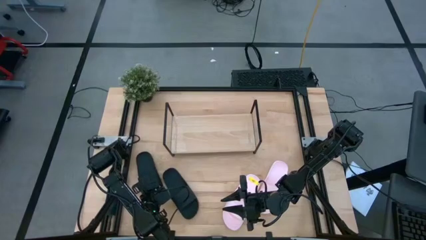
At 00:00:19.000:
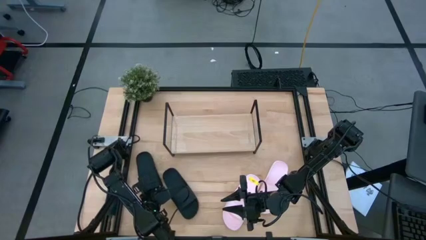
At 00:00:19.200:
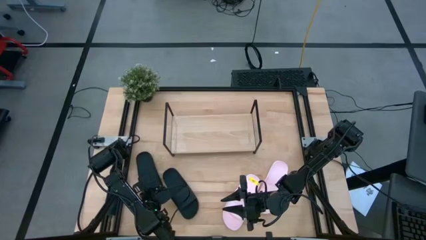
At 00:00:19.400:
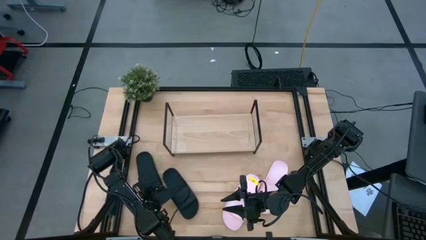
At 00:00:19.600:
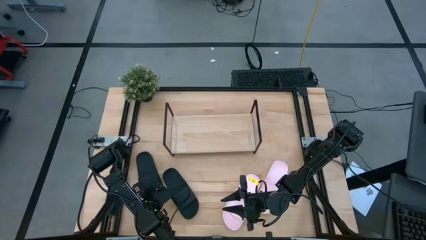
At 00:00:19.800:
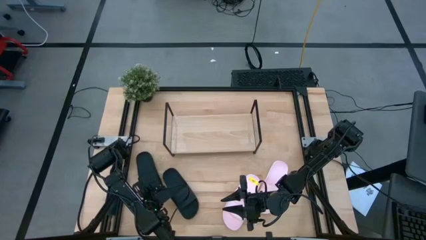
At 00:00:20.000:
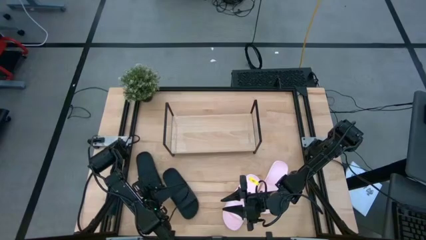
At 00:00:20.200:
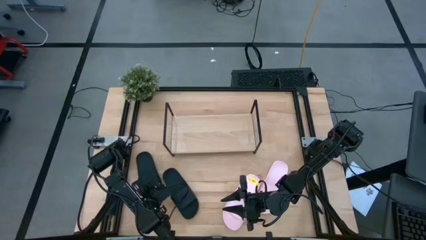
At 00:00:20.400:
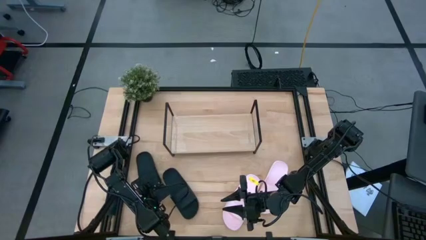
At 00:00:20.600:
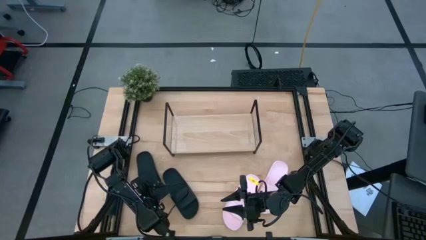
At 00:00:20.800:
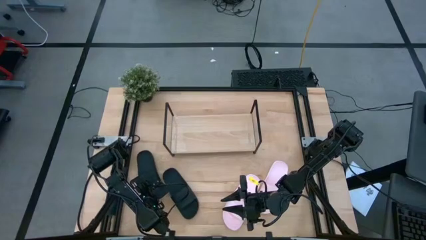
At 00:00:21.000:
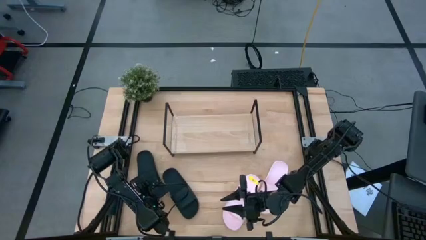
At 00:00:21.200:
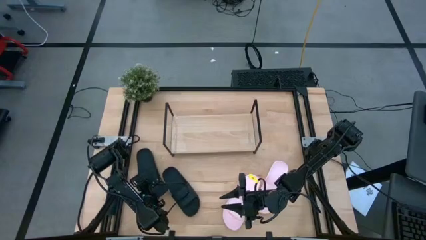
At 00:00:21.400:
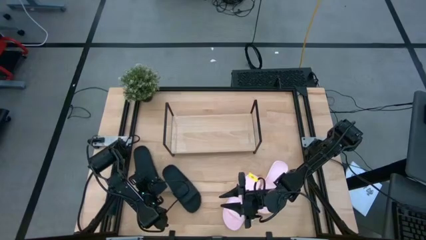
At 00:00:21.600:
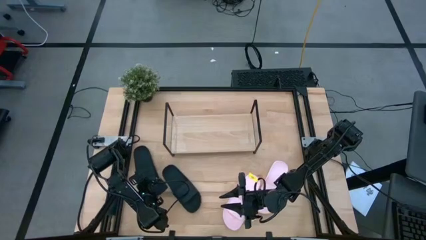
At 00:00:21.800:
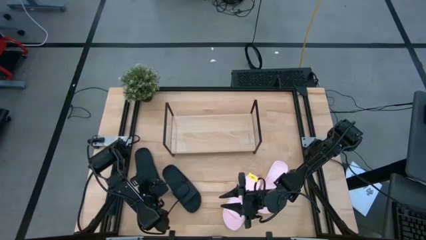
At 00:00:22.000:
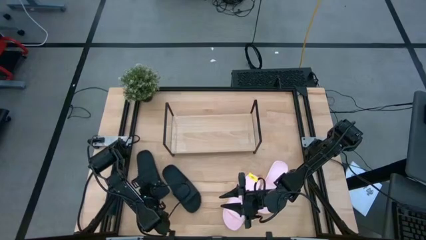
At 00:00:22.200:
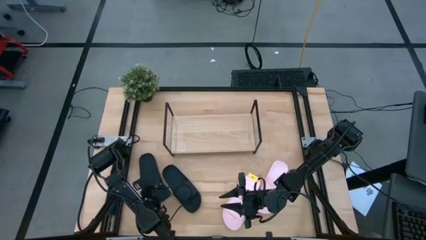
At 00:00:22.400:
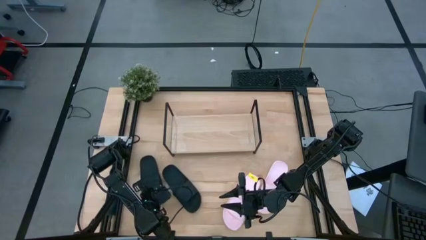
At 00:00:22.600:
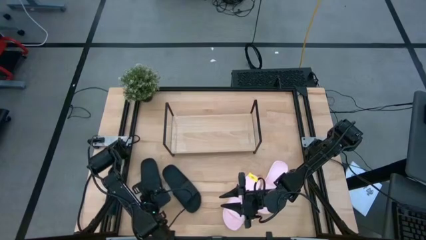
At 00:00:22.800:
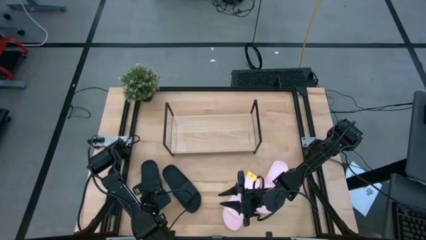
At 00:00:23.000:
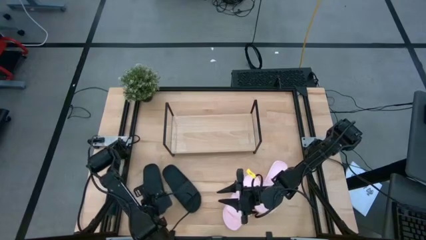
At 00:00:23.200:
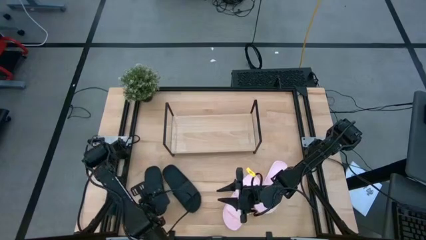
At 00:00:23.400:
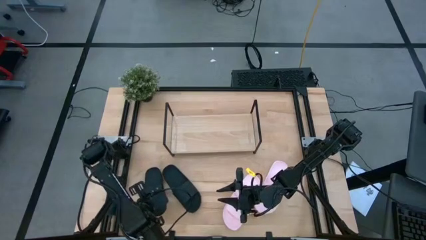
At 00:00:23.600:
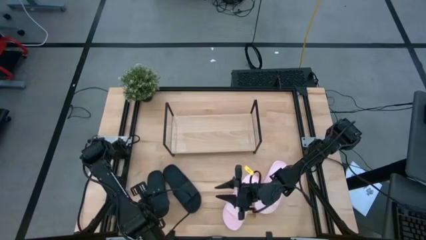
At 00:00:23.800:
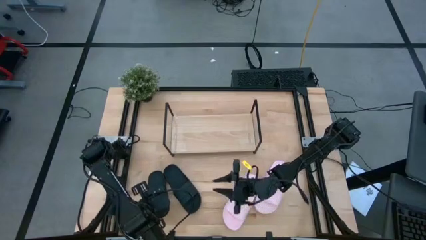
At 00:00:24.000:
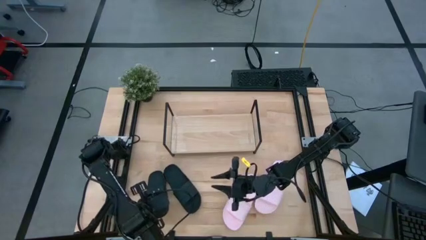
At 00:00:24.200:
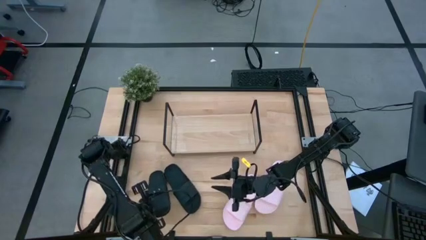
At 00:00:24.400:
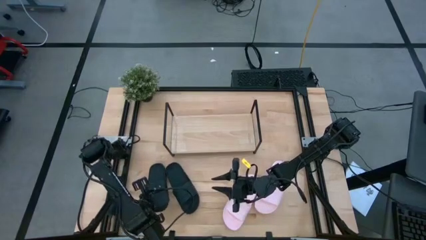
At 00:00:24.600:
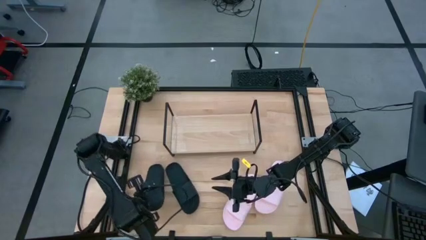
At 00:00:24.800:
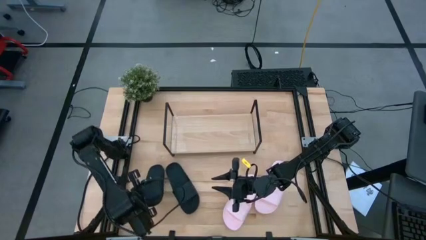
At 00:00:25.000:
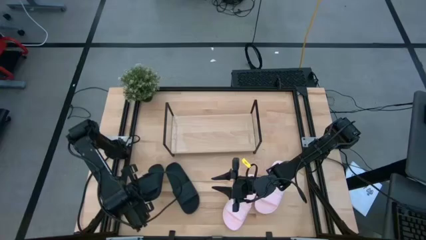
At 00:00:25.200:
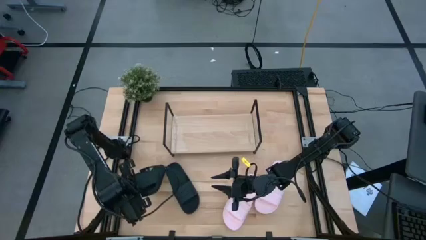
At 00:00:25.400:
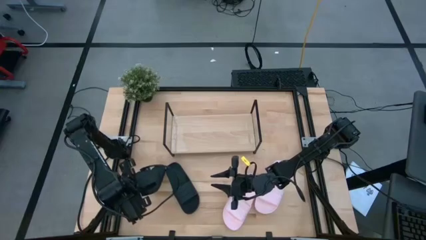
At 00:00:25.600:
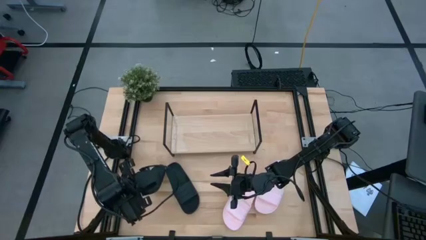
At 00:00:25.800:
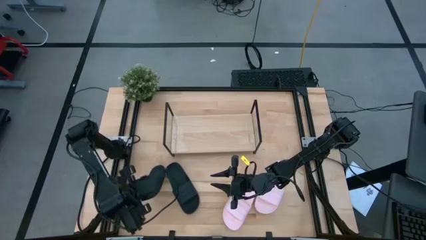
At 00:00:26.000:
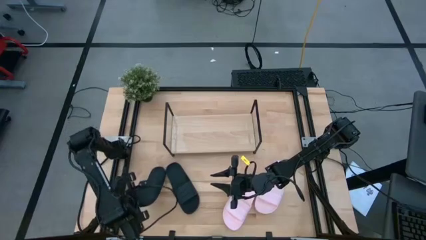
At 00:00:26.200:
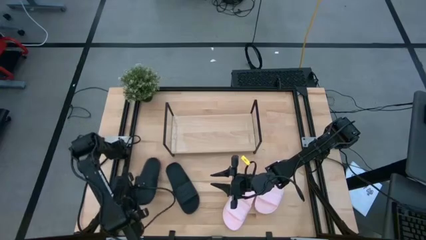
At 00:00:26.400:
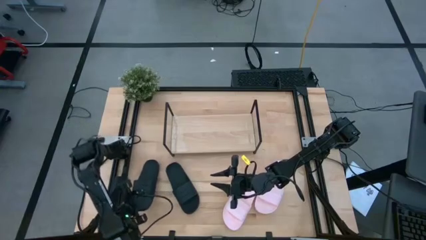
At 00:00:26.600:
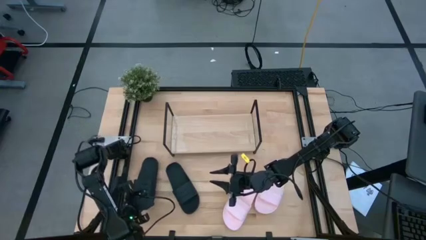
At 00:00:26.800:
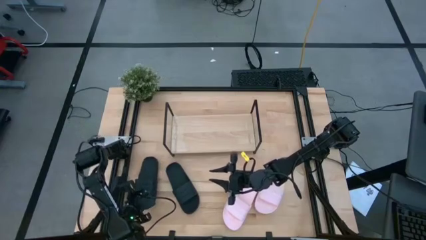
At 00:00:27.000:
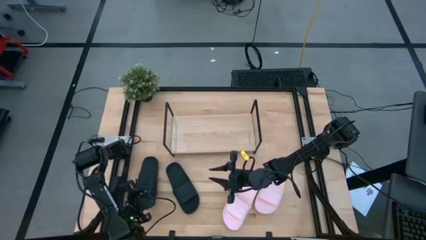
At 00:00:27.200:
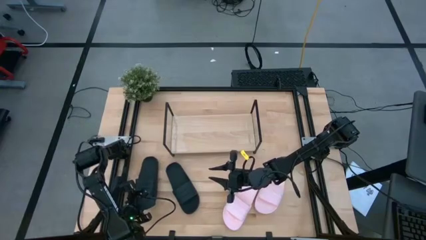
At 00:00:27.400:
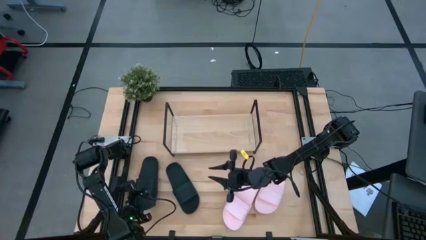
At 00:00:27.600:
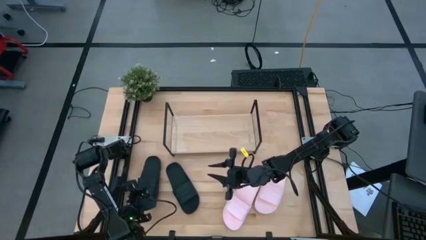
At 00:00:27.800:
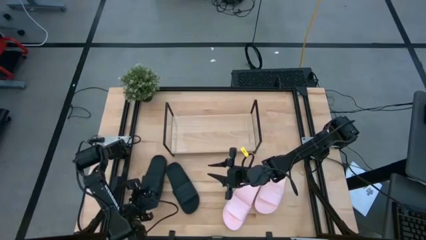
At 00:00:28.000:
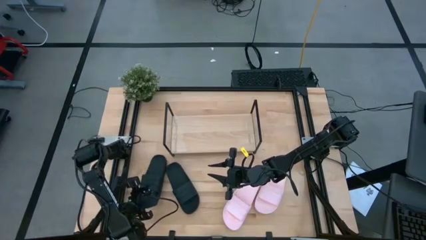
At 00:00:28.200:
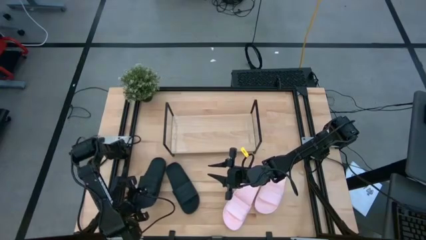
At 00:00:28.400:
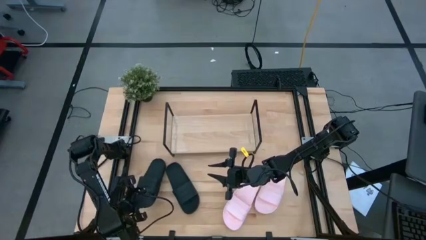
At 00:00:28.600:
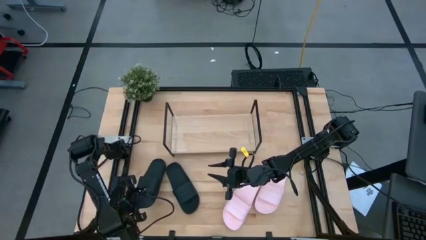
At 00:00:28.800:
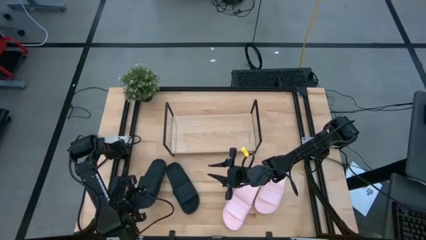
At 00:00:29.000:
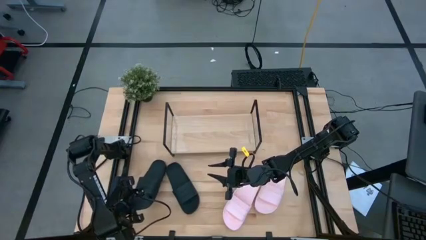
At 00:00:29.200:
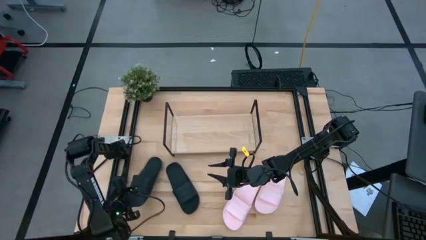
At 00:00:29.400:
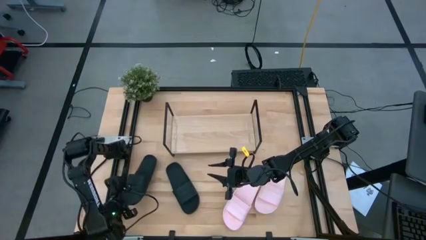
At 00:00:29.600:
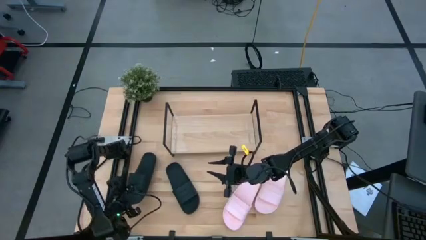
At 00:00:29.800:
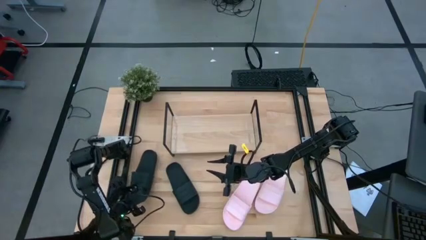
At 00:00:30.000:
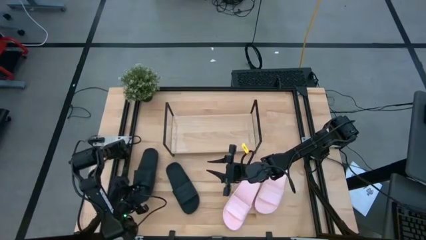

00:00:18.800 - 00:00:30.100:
Task: Pick and place slides into the shelf
Put the left black pair of slide on the shelf
